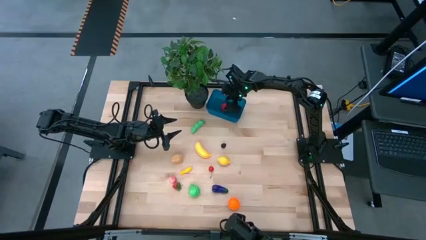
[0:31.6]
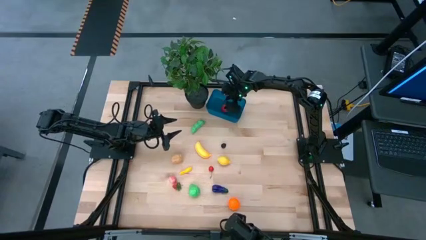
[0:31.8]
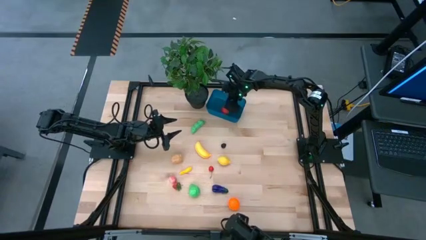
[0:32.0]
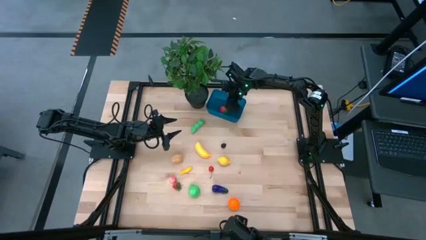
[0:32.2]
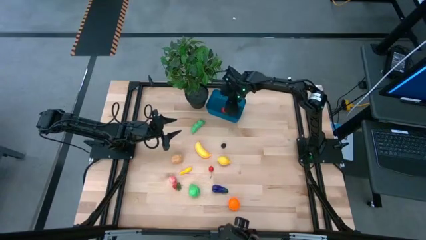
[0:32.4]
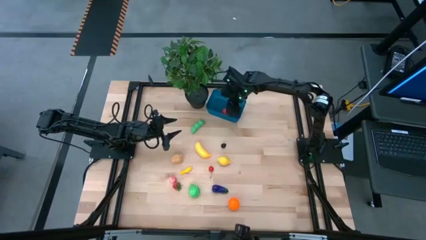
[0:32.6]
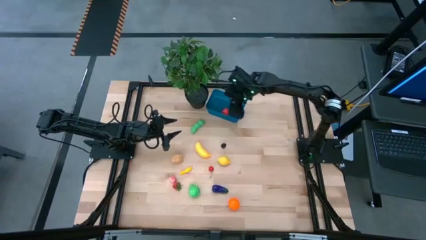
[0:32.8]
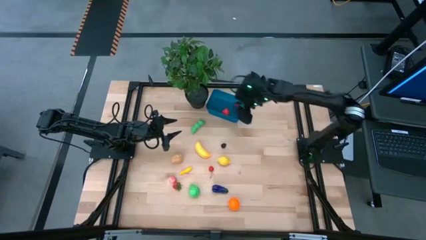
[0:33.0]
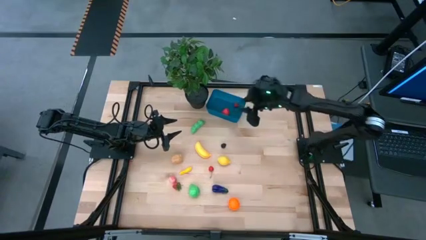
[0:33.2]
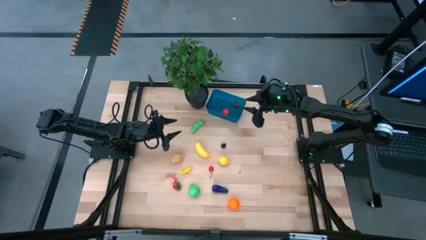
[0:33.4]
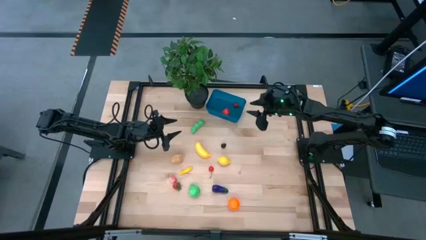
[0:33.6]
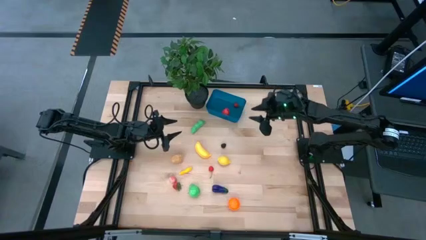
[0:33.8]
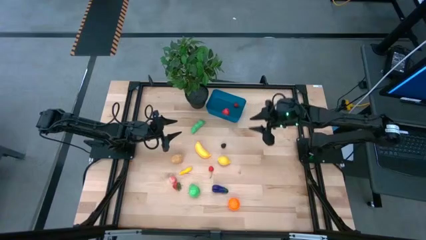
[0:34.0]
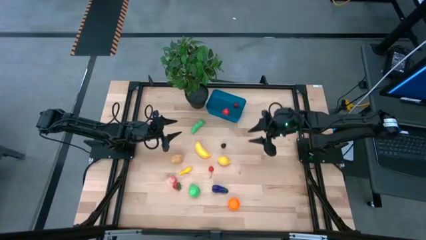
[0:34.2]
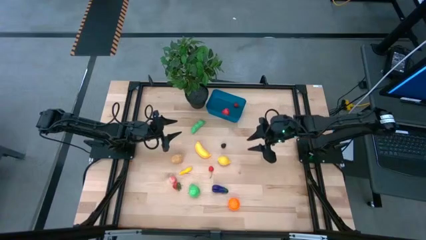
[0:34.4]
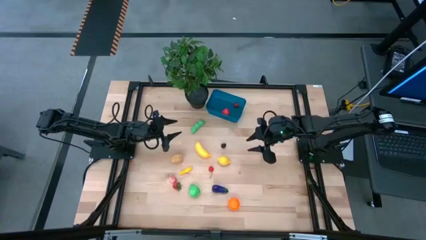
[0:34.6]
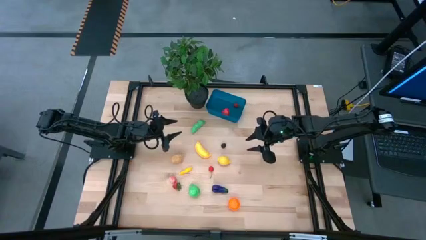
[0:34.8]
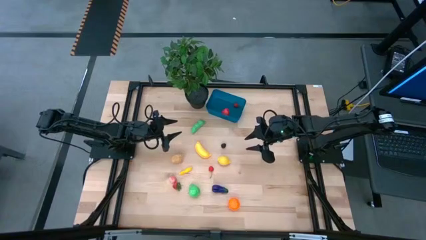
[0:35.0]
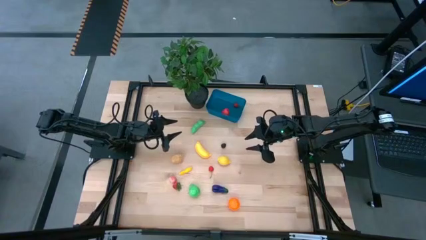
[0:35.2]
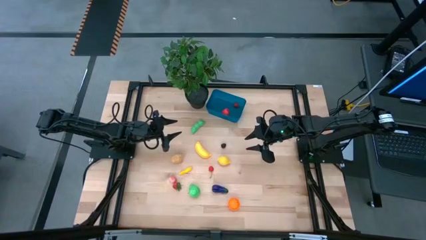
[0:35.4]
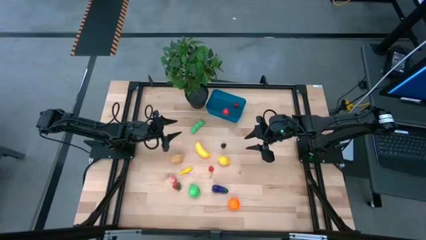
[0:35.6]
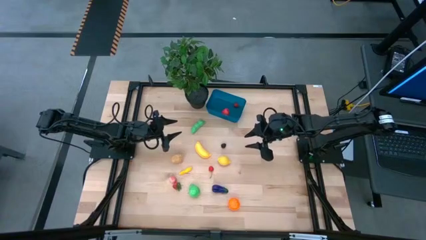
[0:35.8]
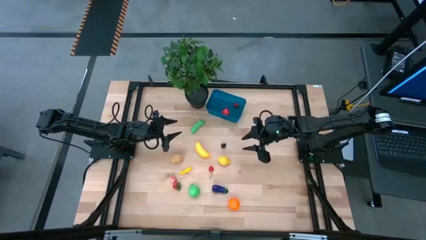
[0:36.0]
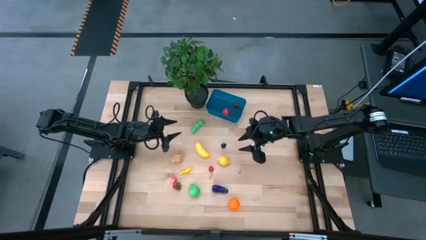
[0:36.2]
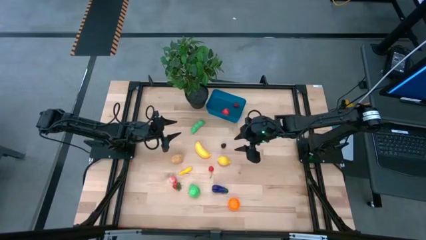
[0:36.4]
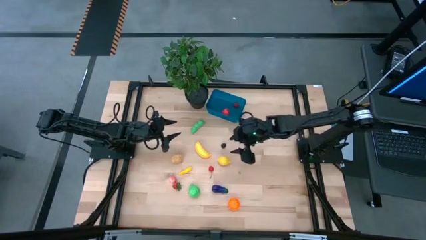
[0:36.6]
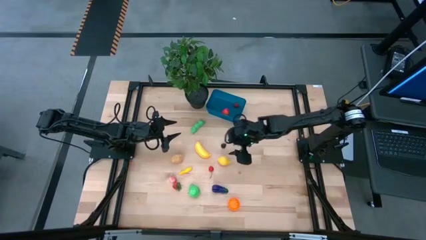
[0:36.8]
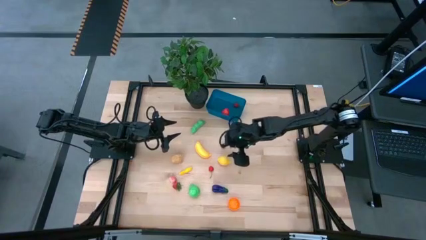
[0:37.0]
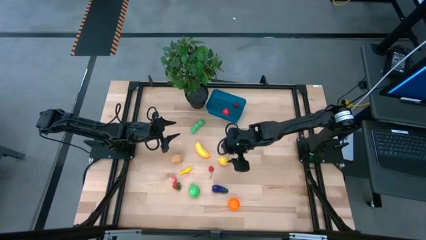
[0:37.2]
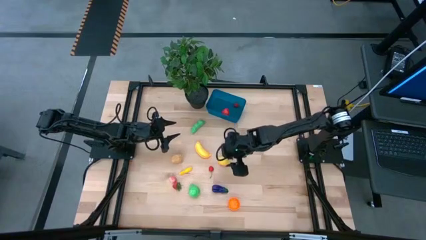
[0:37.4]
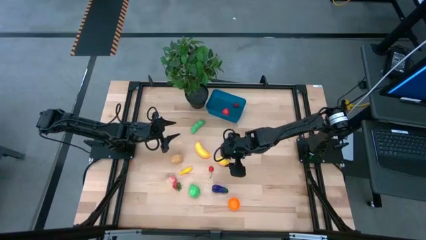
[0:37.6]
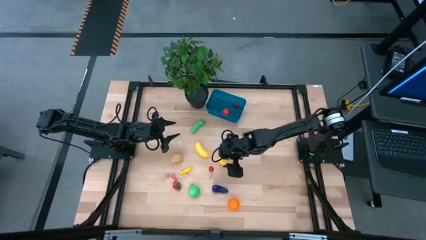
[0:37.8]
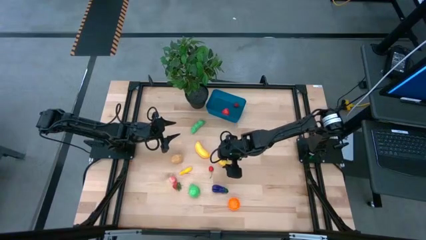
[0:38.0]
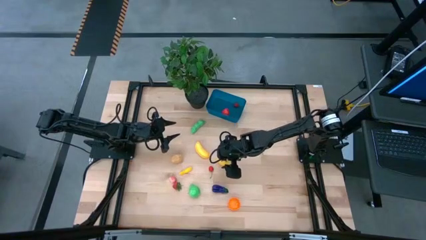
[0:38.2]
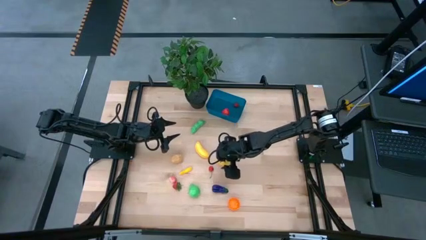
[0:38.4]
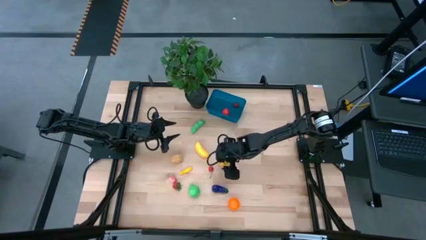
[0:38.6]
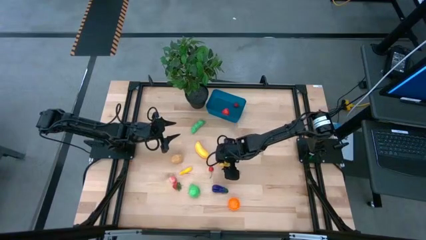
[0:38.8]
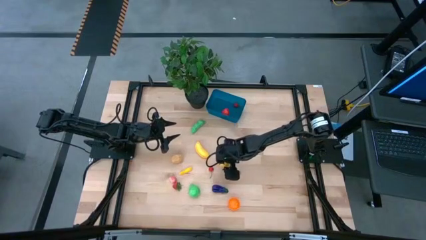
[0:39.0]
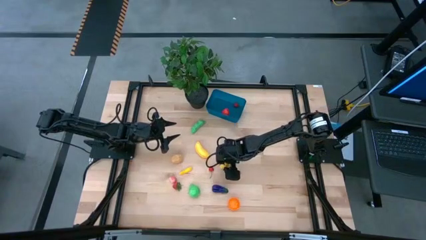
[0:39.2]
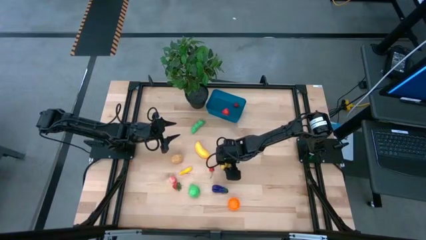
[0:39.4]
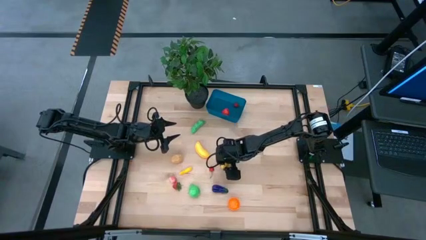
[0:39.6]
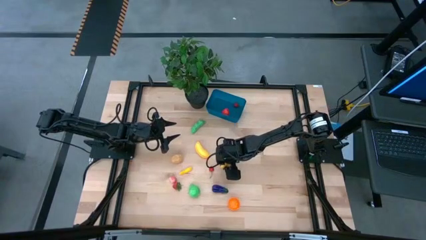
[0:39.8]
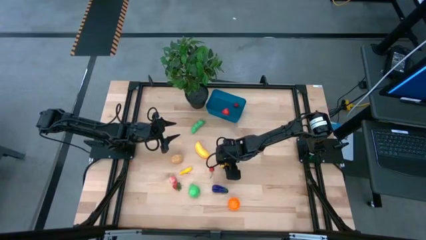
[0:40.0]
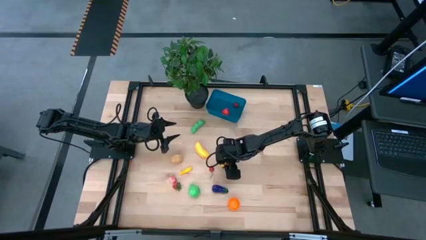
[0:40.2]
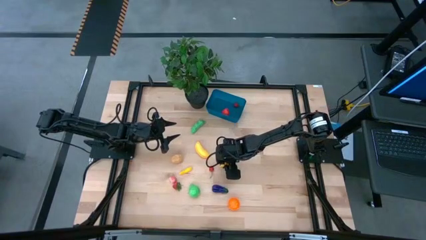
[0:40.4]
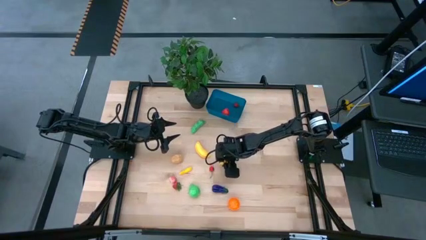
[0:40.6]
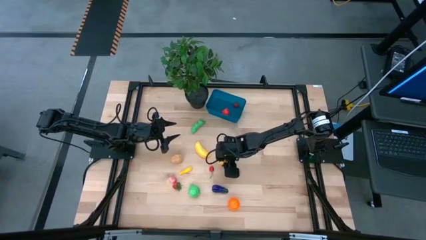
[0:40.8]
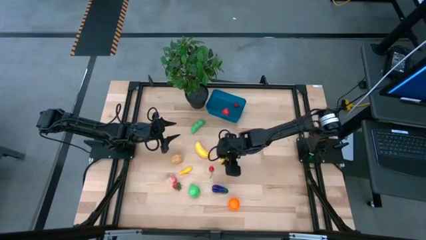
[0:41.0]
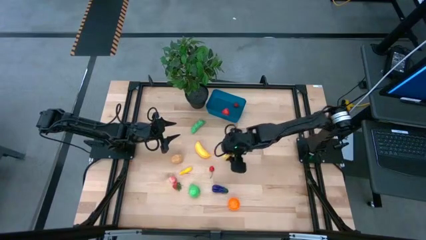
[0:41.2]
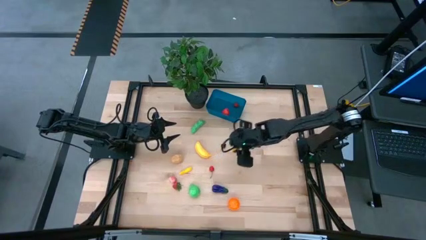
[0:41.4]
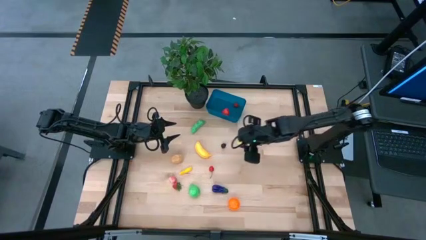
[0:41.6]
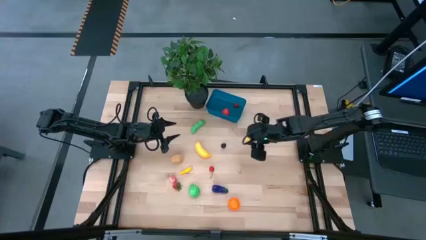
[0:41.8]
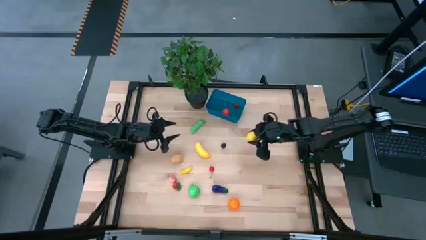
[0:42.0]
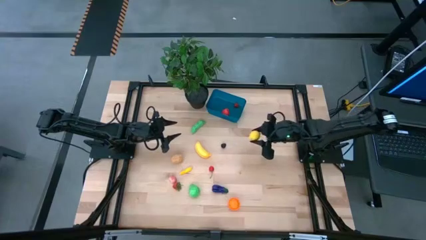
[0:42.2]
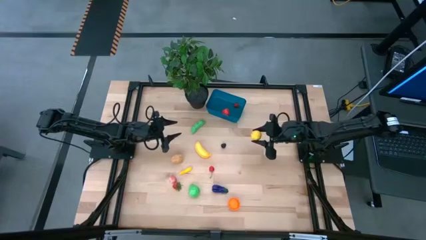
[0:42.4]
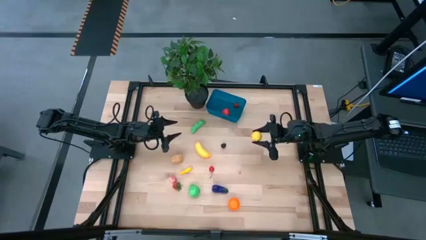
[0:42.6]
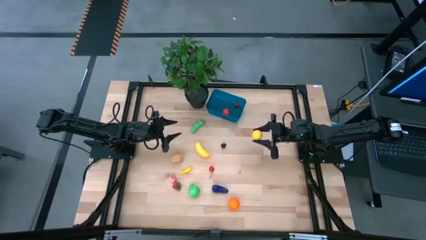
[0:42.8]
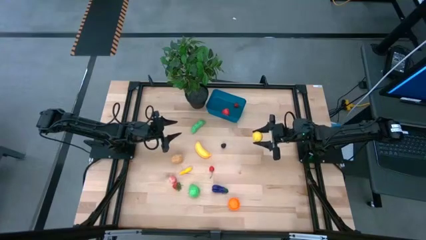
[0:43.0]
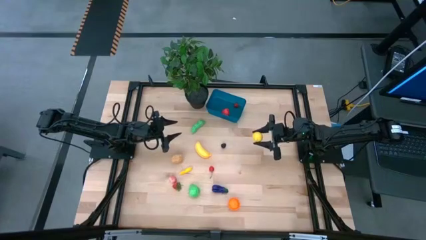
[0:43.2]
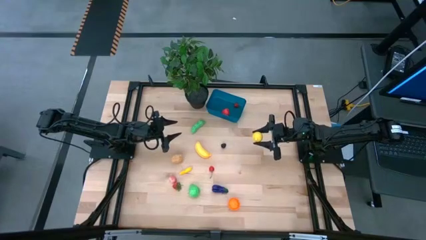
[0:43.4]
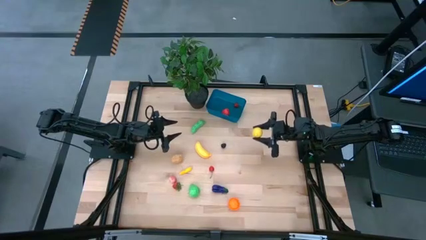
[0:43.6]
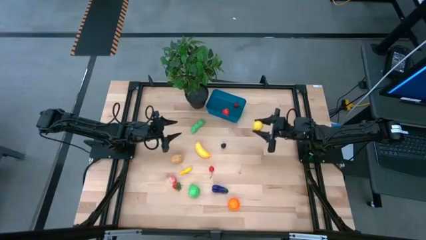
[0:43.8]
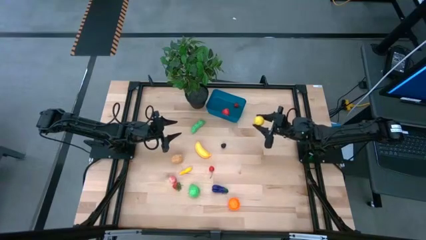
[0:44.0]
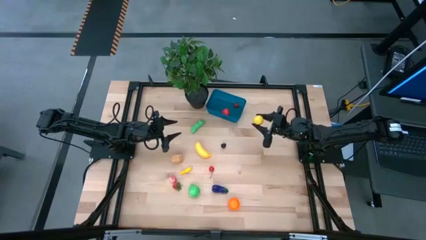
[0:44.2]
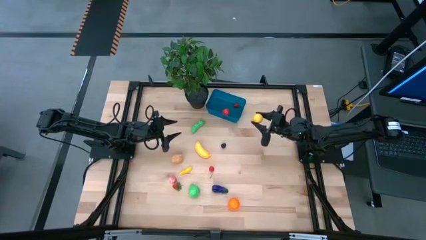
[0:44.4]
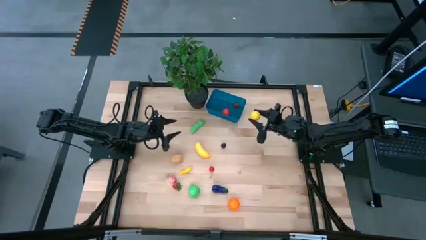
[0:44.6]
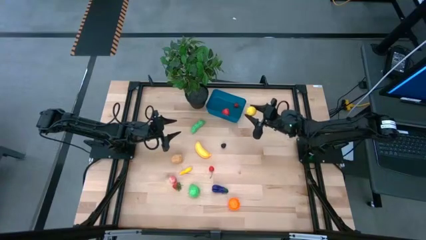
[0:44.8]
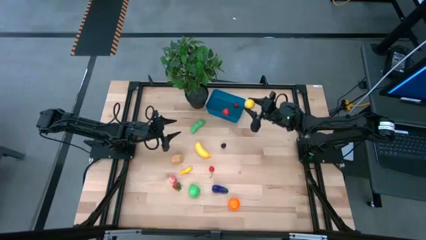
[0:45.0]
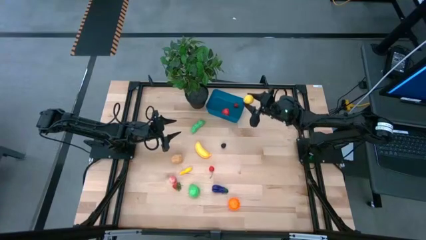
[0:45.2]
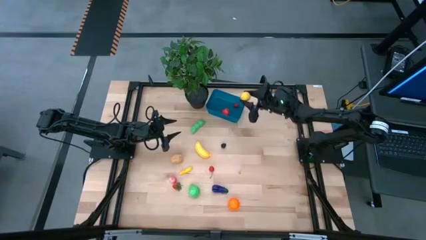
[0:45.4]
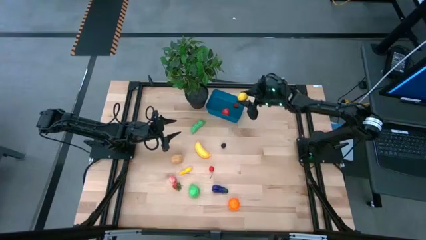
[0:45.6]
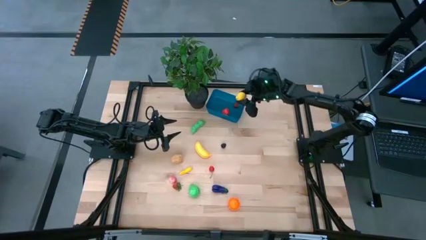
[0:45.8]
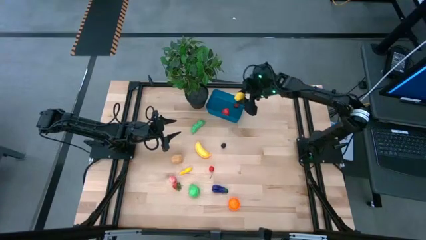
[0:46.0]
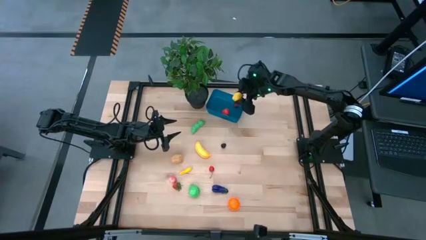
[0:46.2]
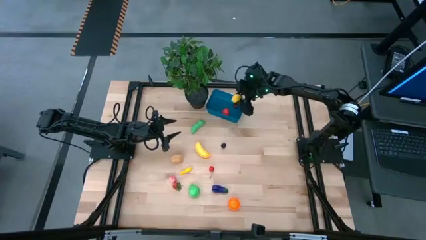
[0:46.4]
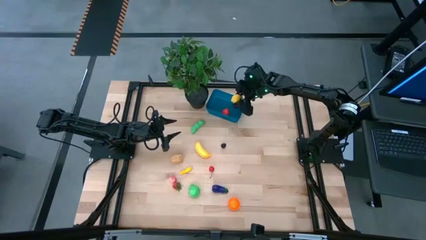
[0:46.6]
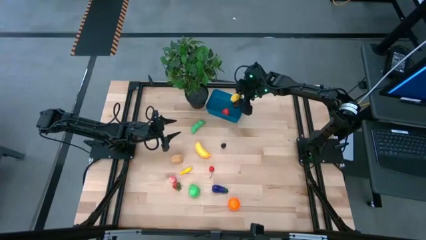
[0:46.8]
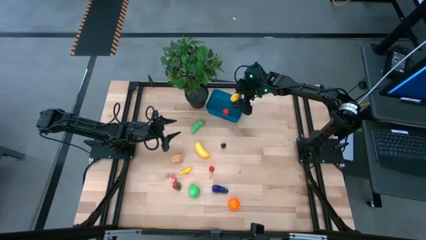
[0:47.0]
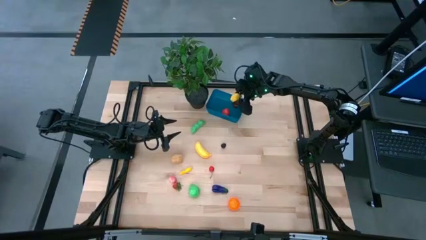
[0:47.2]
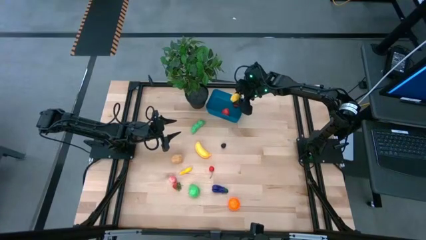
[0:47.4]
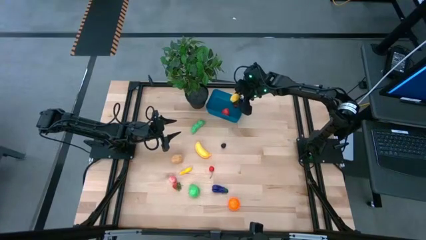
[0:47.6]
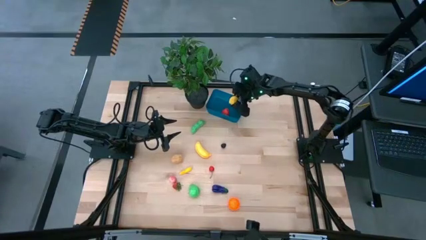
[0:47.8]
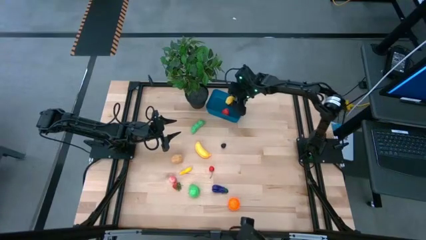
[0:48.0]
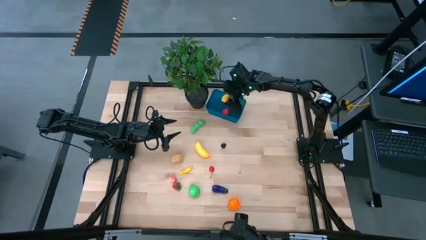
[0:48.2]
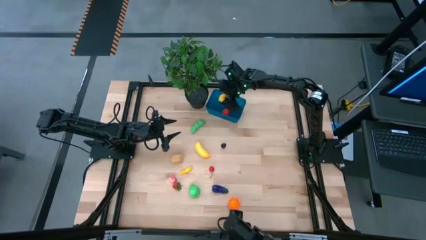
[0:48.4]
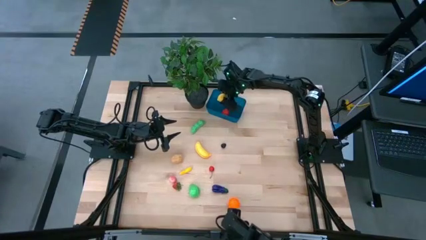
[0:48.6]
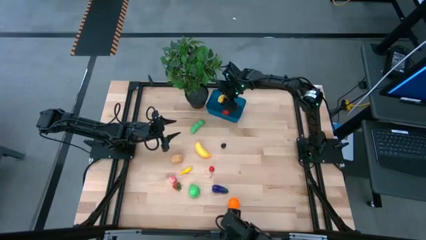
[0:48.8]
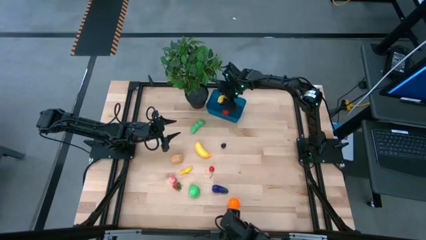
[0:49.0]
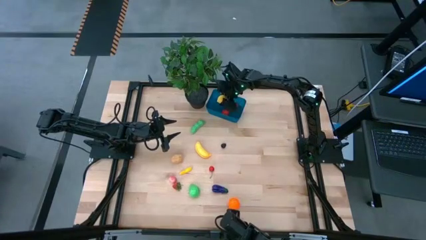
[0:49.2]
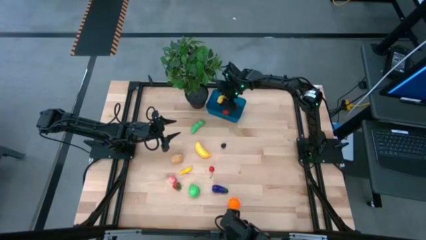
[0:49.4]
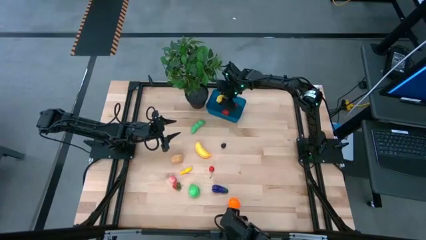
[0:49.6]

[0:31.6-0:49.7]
Task: Pick and placing Produce into tupperware
Put the yellow lemon into the blue container
